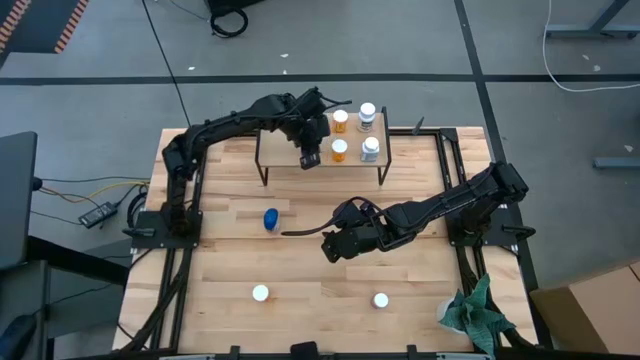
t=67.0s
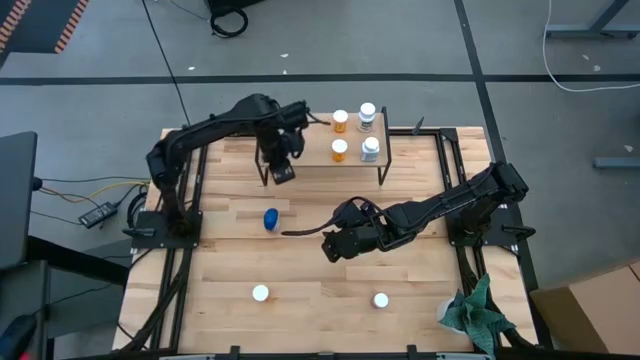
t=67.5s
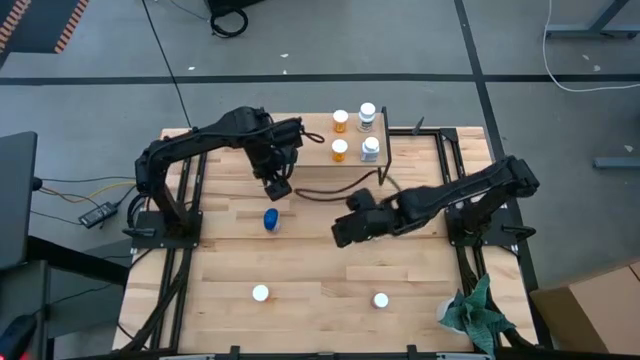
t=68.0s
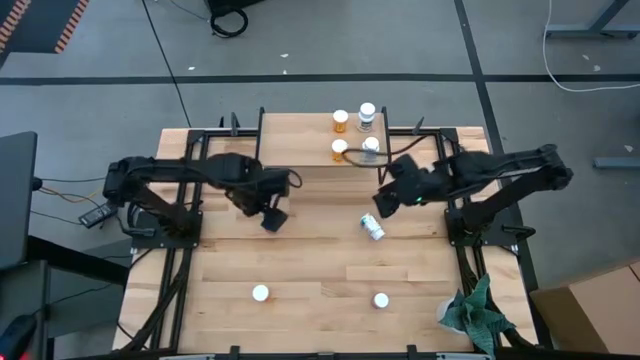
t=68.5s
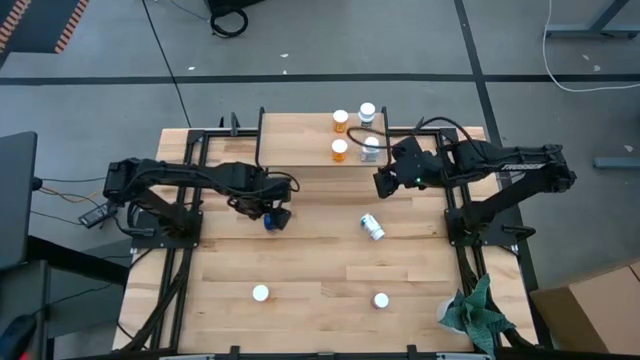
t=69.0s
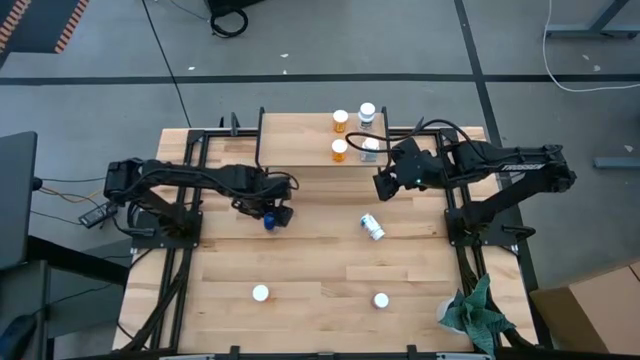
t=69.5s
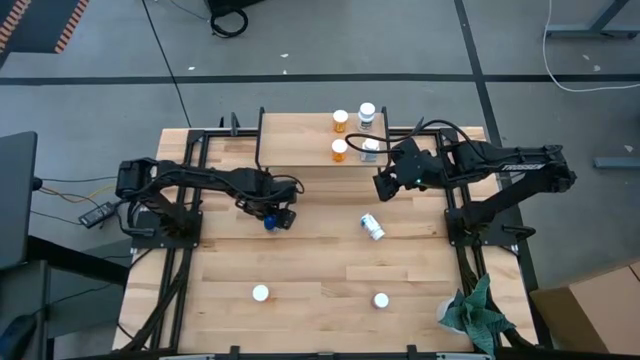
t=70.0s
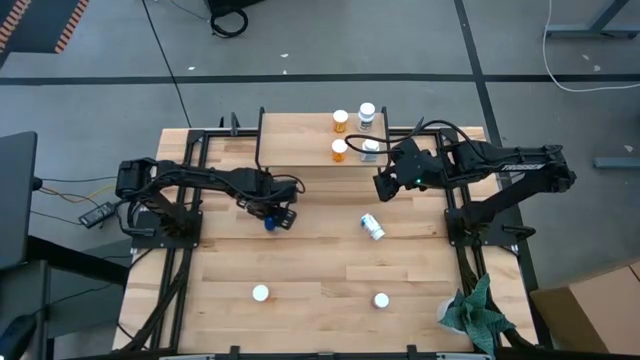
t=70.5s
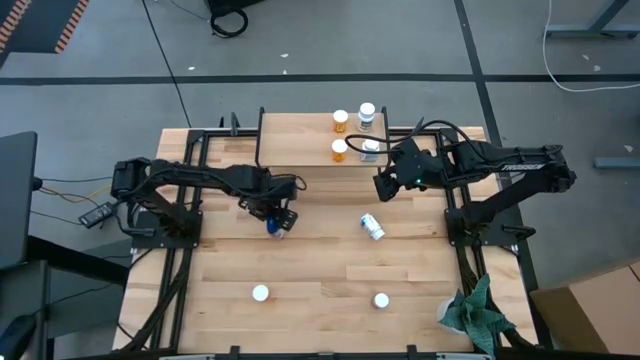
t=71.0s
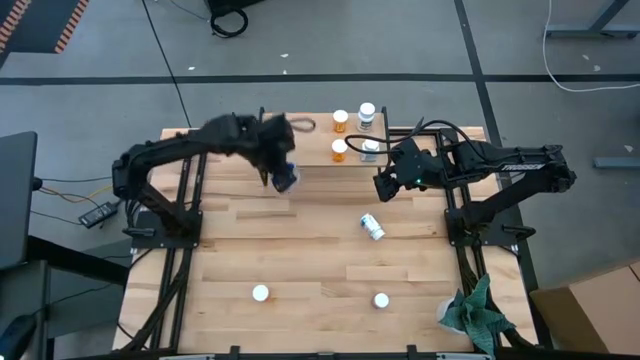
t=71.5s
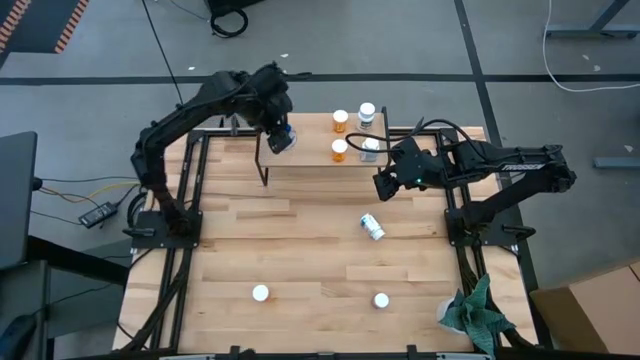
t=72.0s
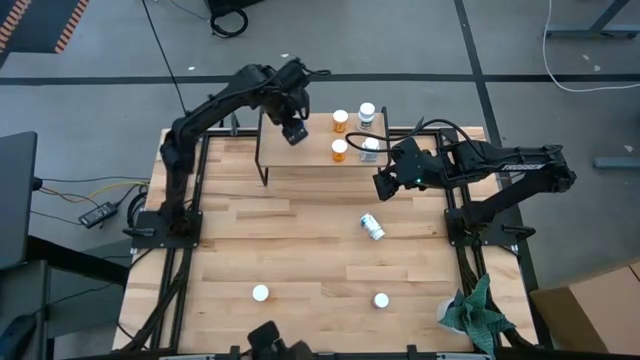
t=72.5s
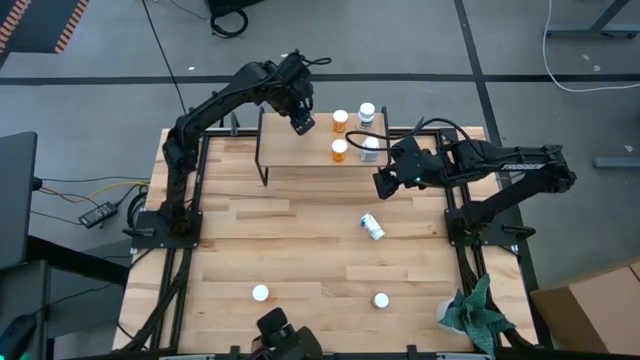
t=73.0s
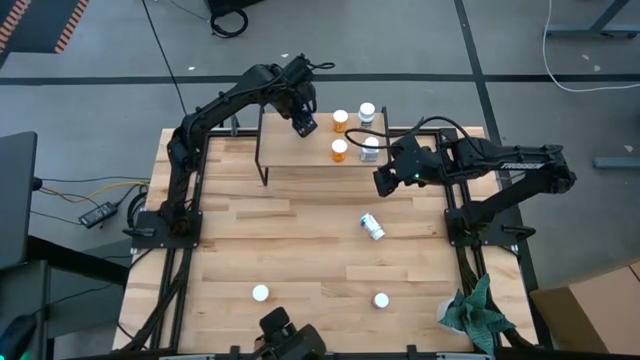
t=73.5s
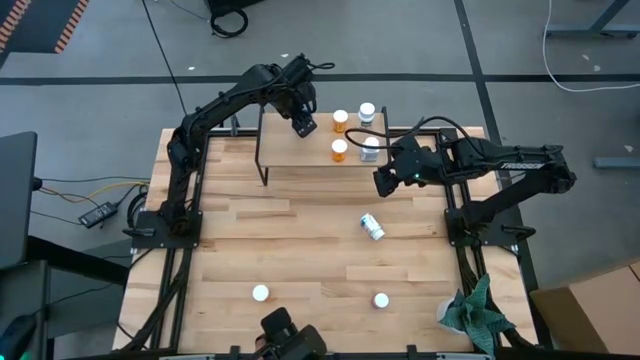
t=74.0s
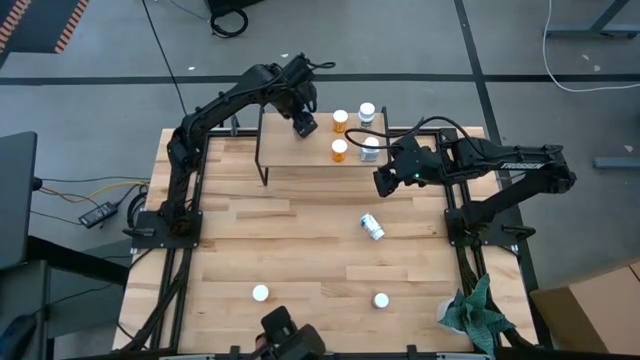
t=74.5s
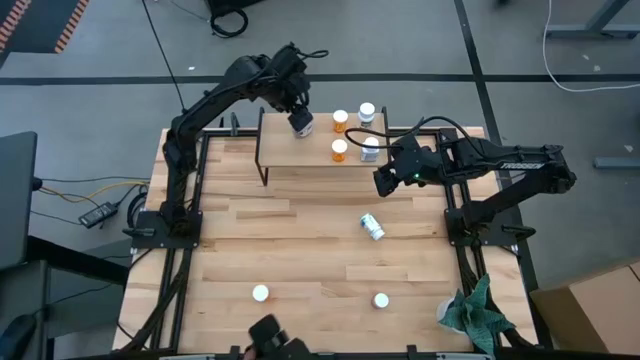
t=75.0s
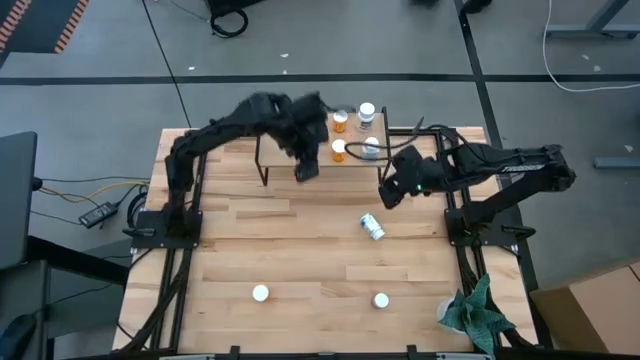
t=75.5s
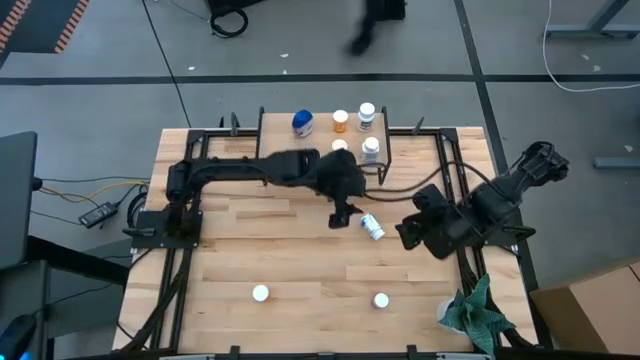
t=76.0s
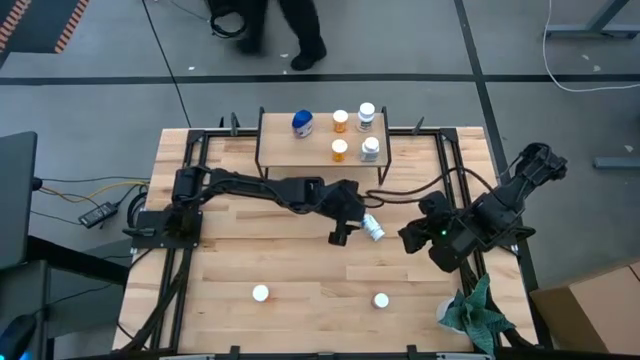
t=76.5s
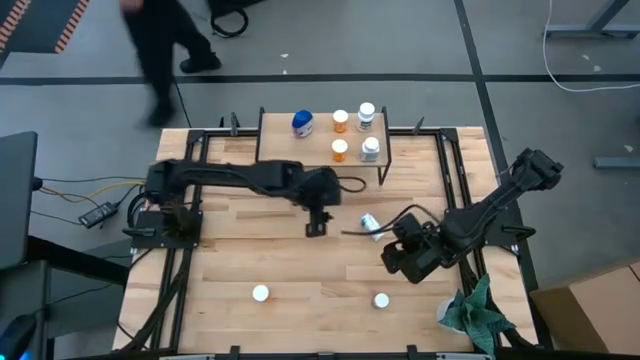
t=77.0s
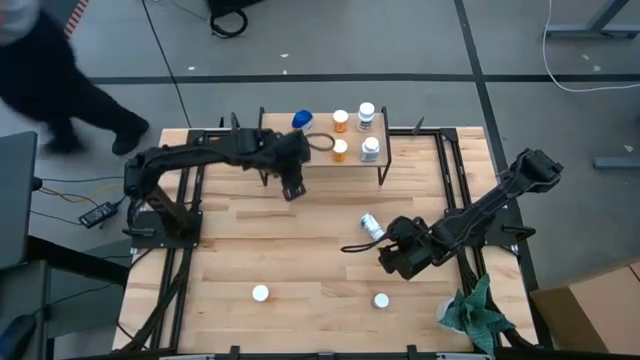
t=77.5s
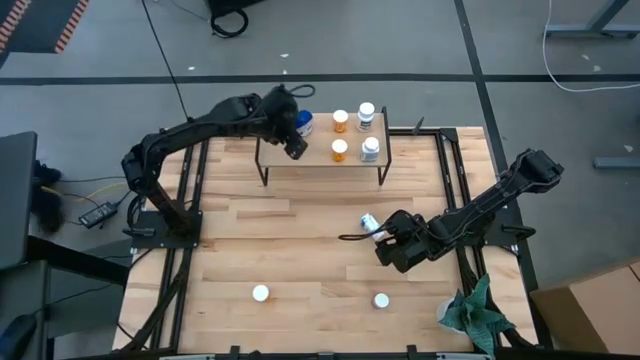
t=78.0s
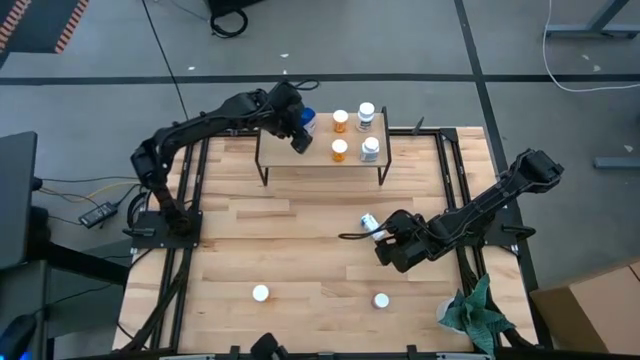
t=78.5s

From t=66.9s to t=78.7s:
Task: Pick and place medicine bottles onto shelf by color
Put the blue medicine bottle on the shelf

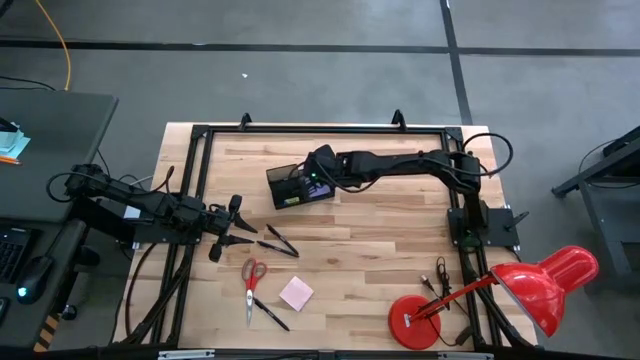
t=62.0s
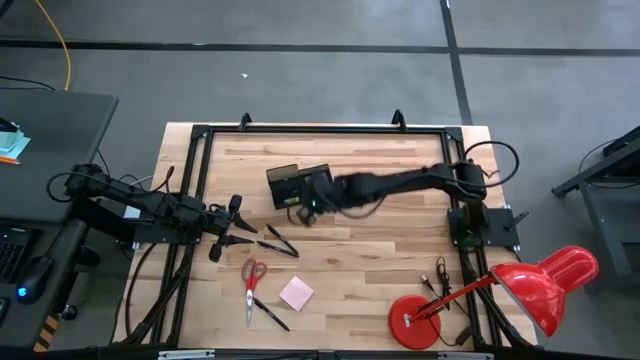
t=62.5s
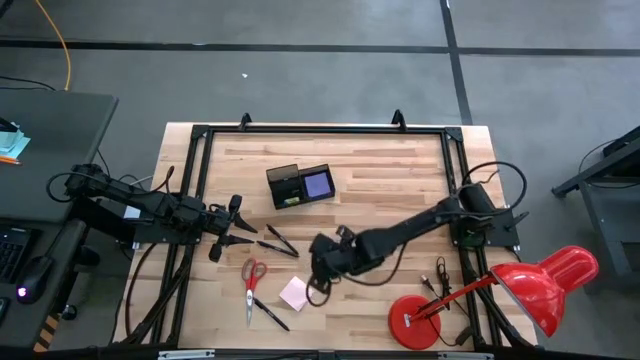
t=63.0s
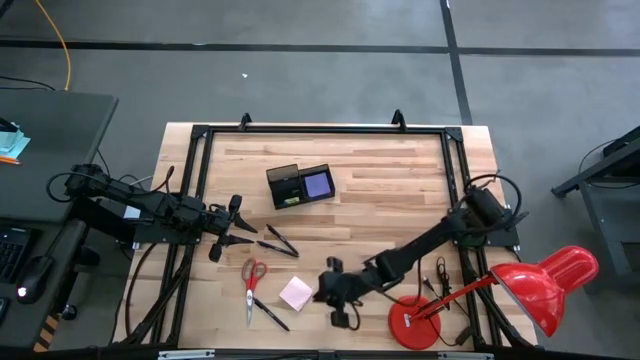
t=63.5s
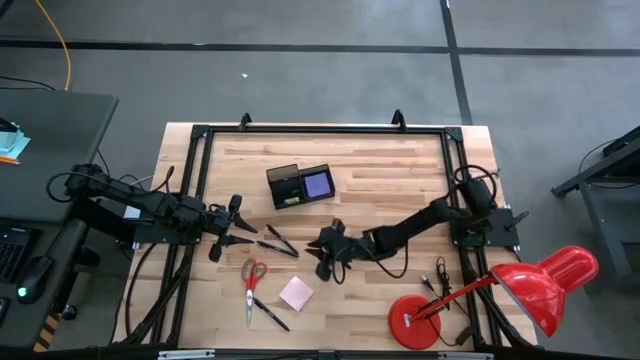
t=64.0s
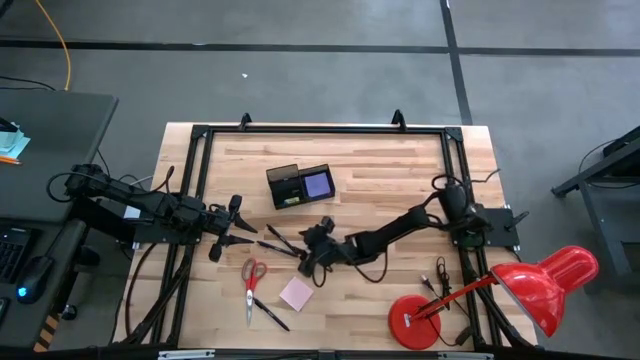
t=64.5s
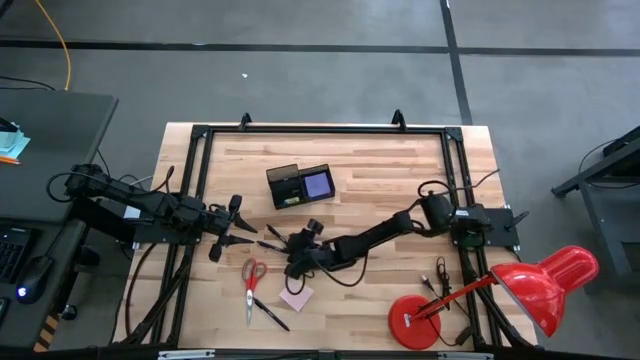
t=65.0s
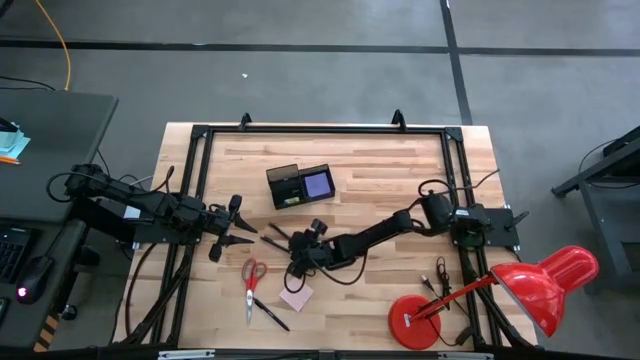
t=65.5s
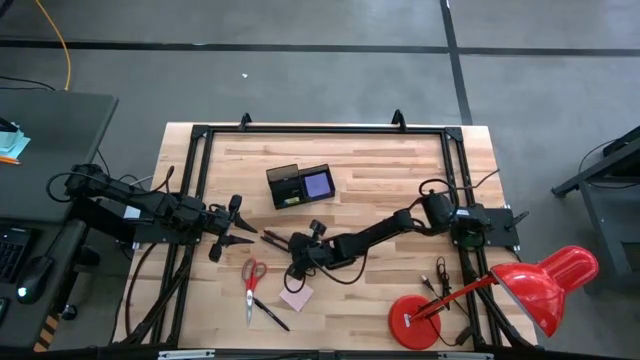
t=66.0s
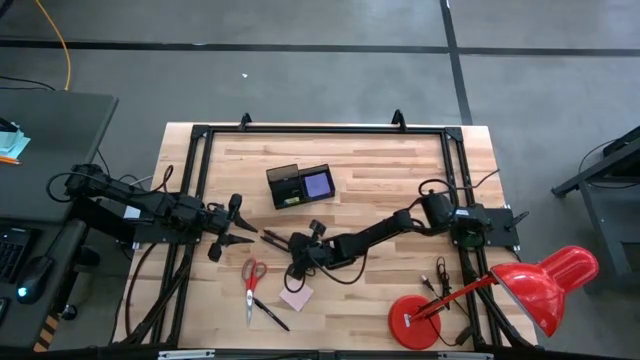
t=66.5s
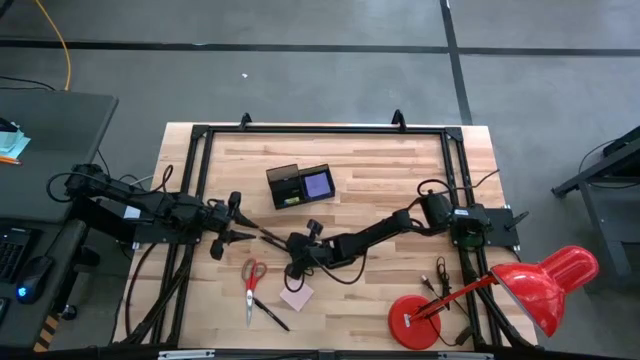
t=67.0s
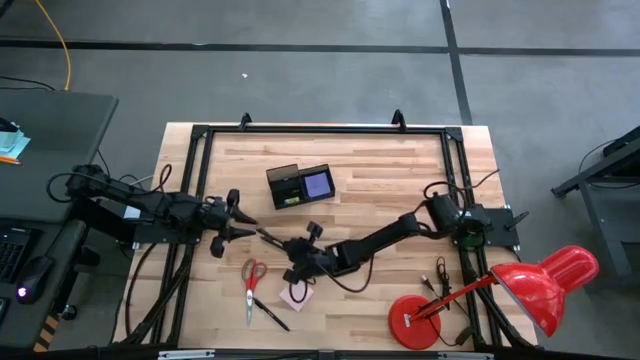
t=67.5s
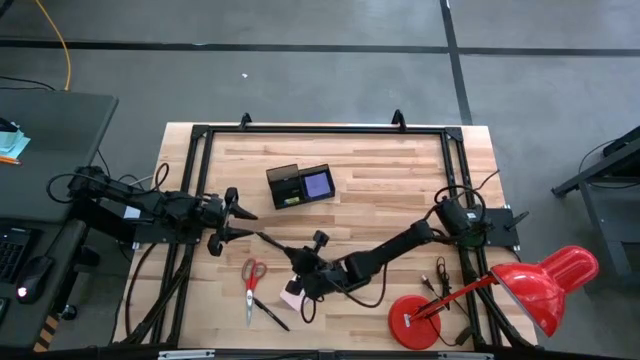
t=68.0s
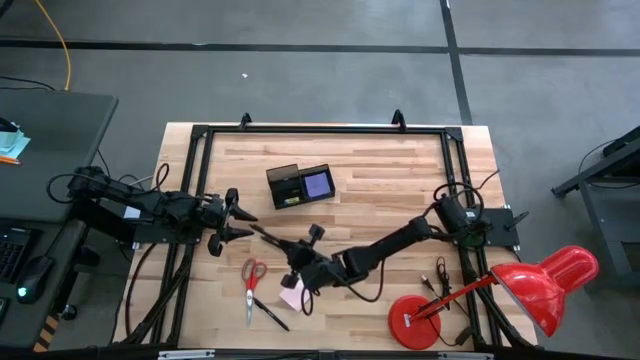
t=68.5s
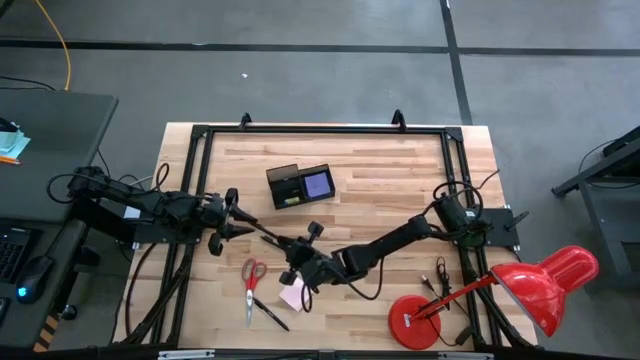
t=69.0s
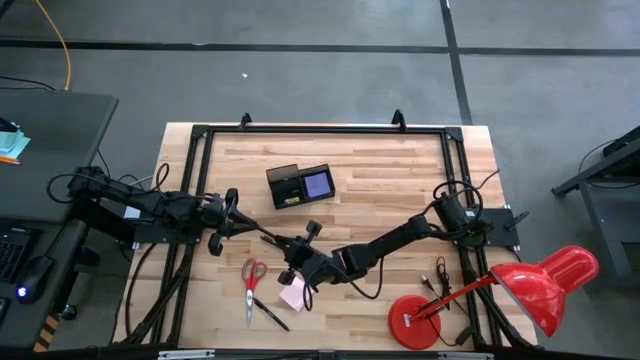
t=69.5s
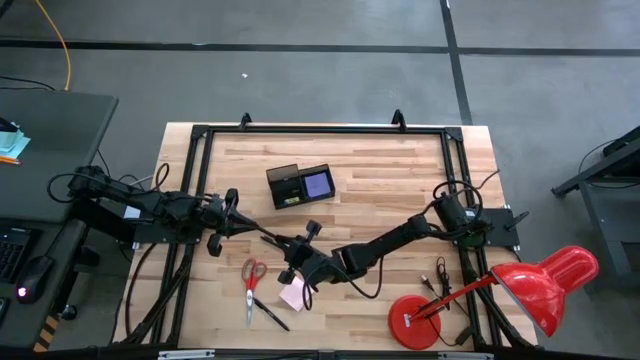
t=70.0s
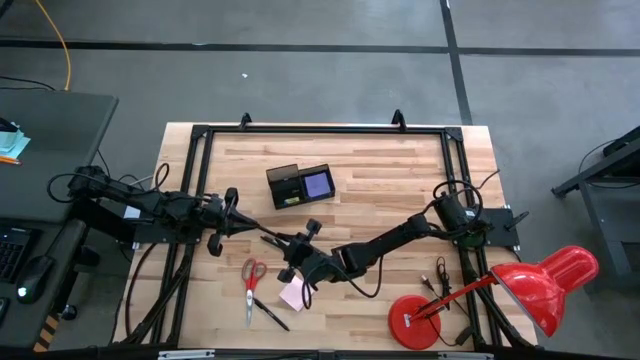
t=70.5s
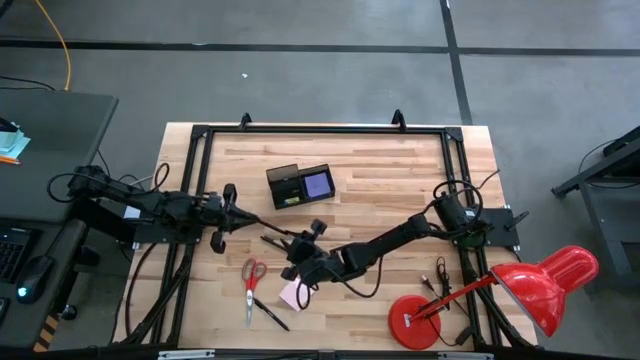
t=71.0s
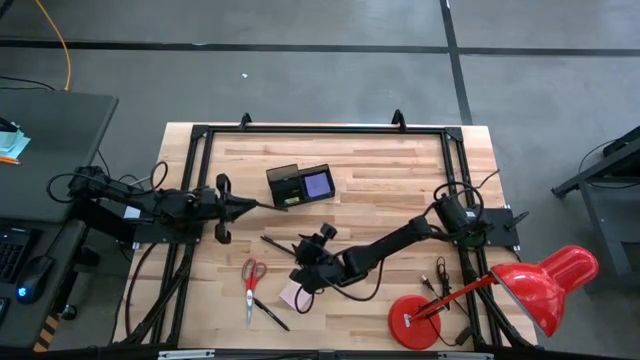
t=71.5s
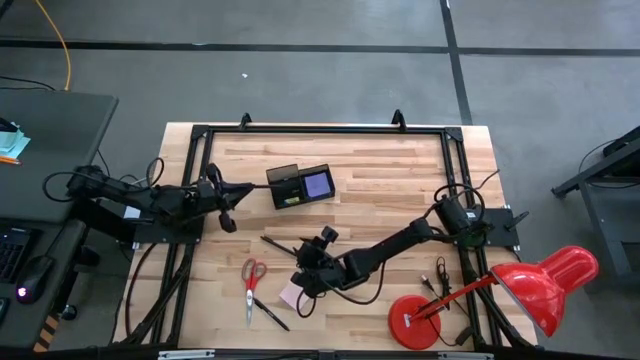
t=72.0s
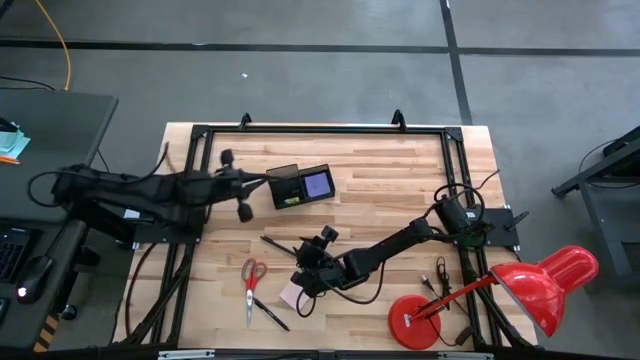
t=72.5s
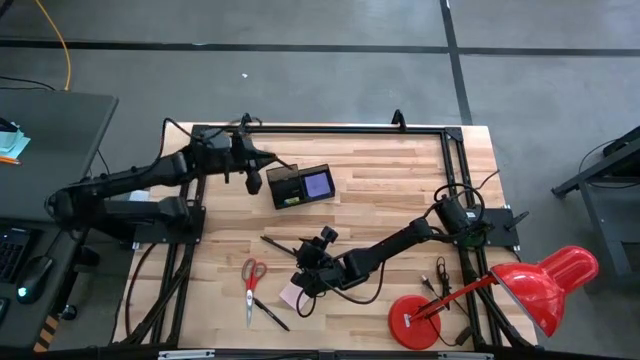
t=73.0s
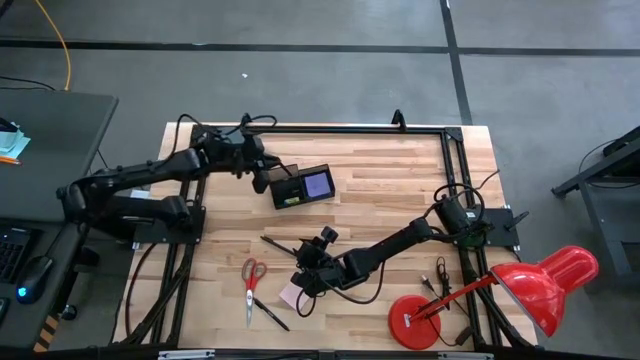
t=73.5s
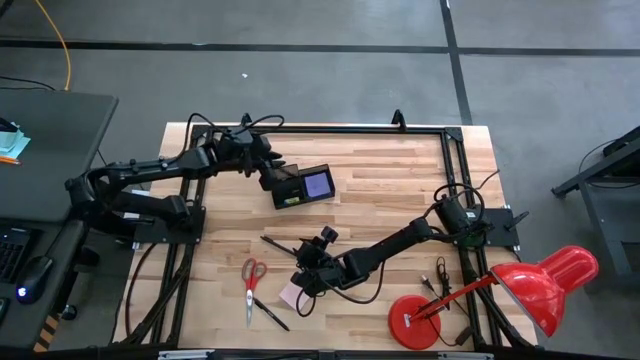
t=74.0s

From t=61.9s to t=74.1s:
Task: Pick and place office supplies into organizer
Put the black pen into the black desk organizer
